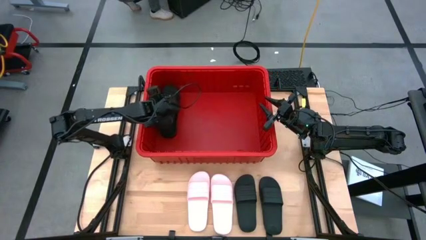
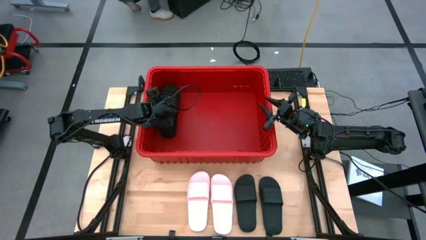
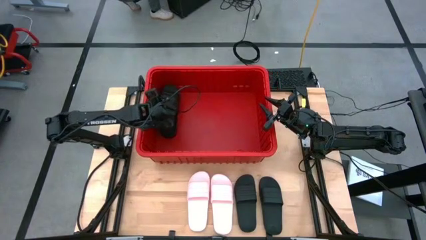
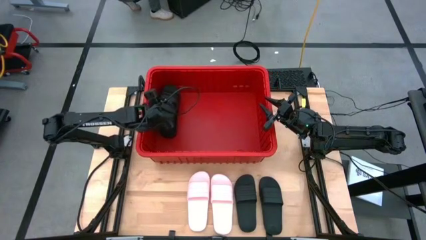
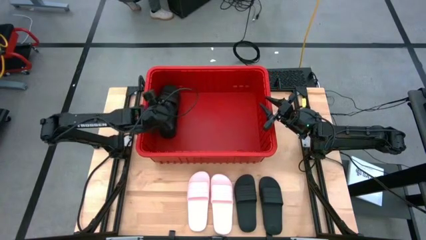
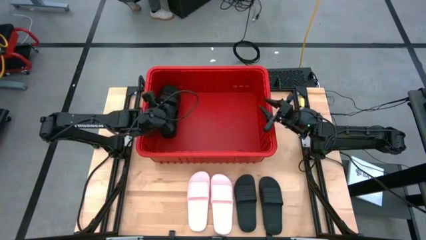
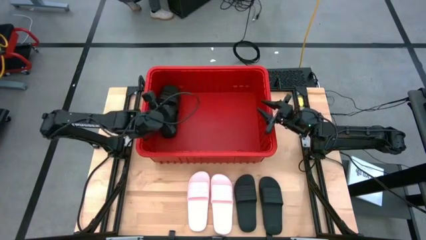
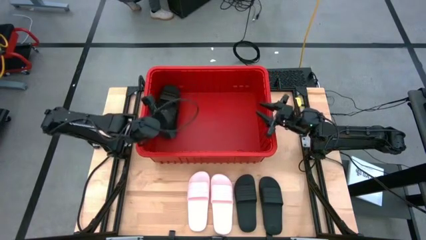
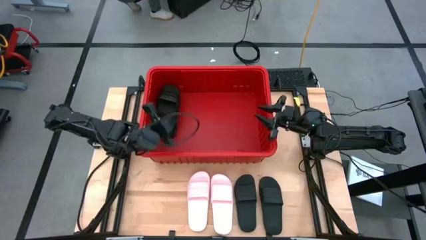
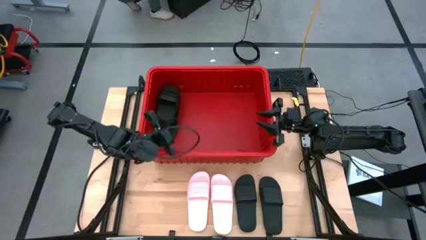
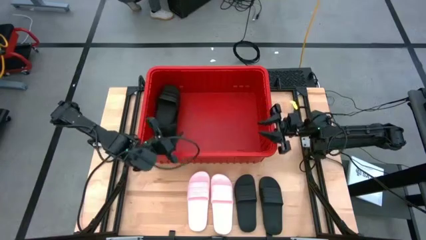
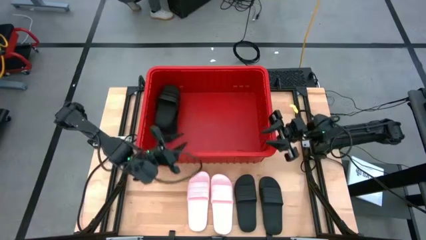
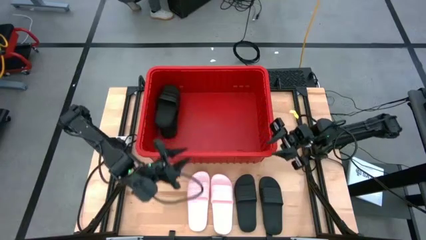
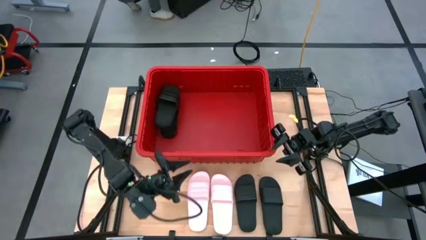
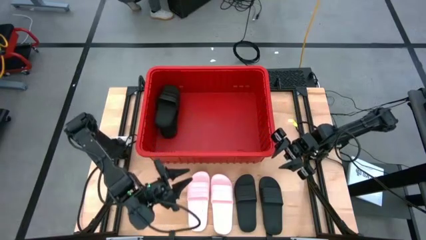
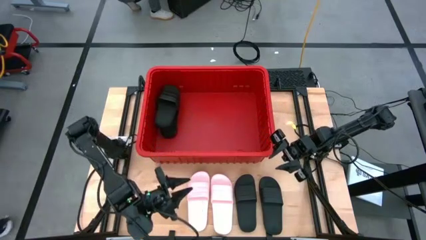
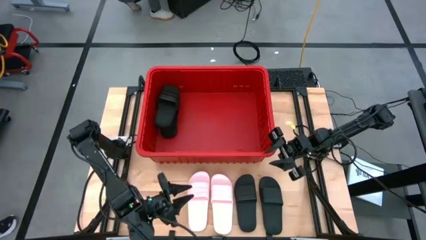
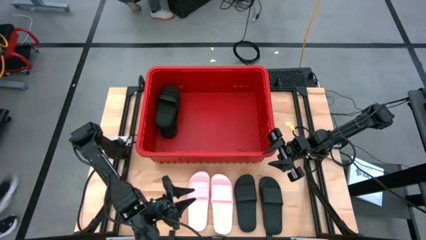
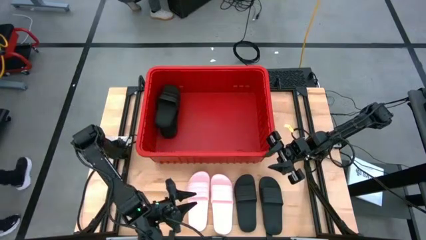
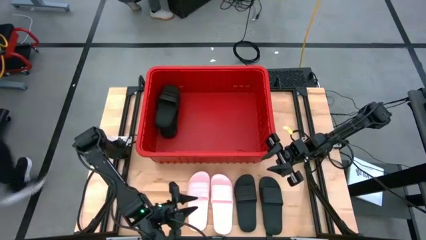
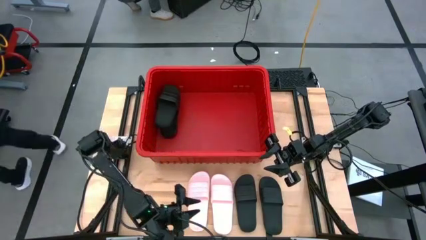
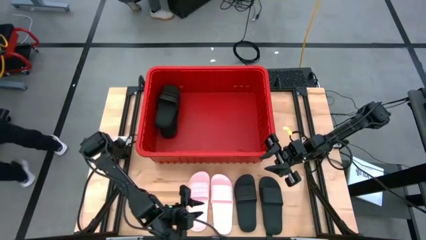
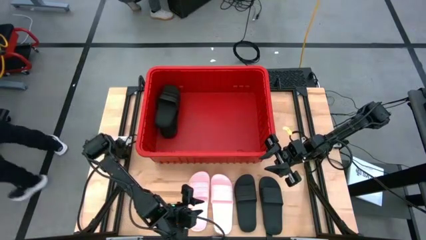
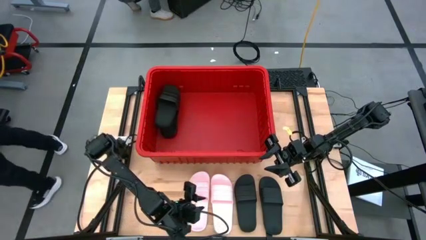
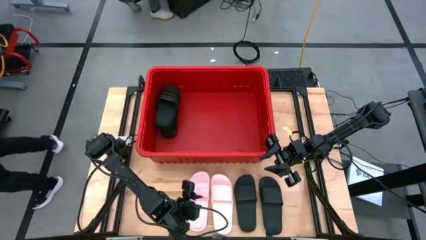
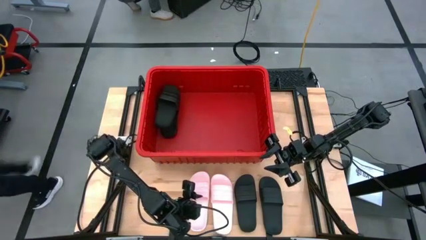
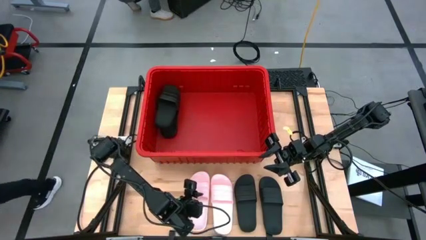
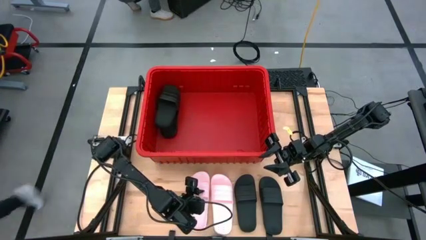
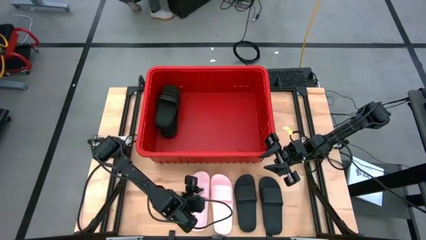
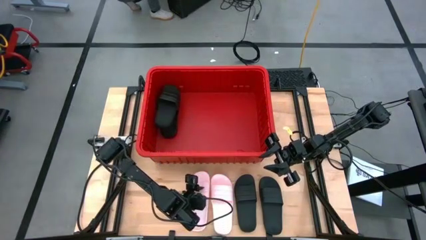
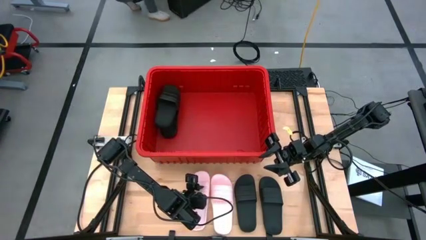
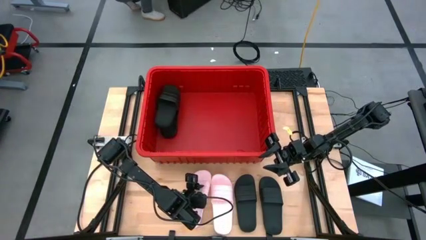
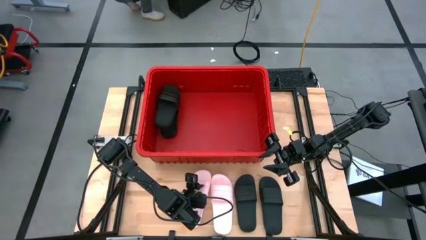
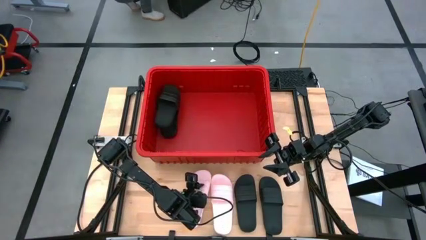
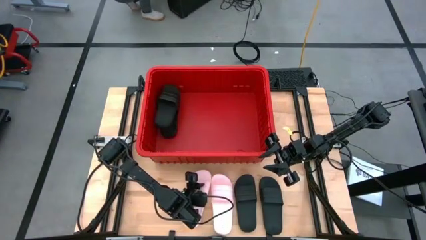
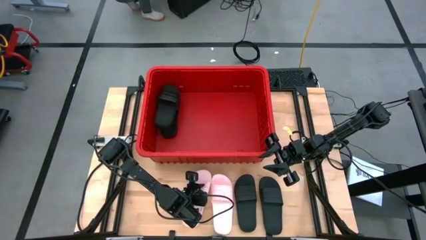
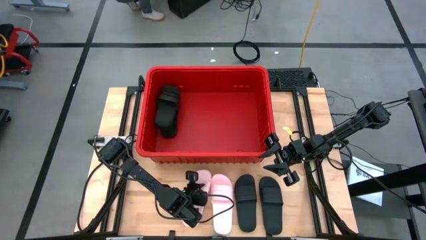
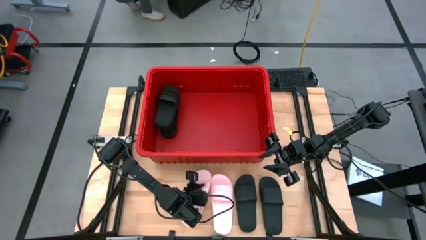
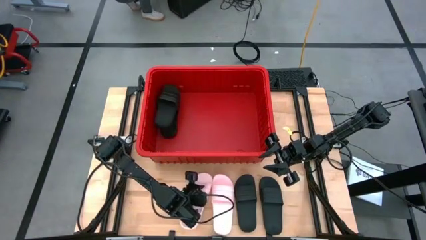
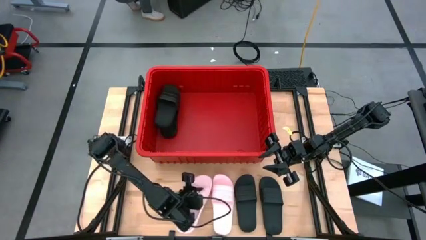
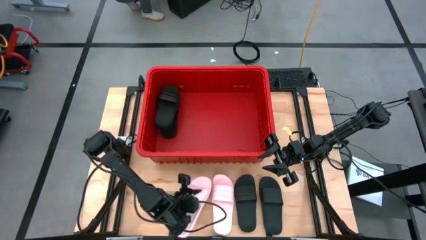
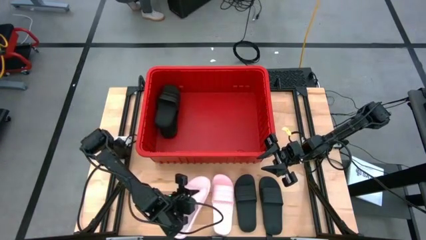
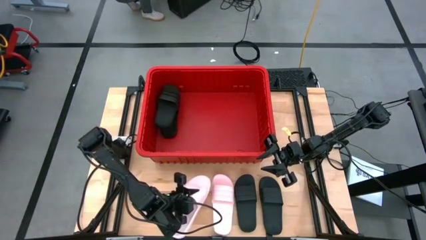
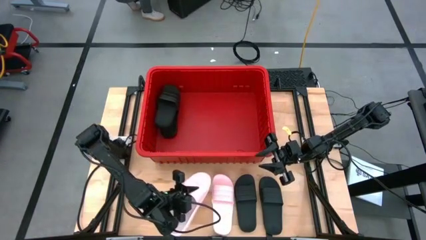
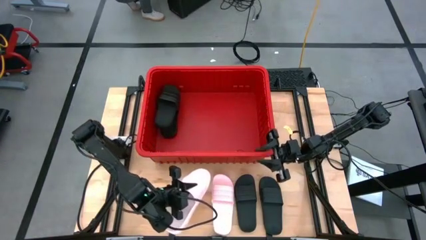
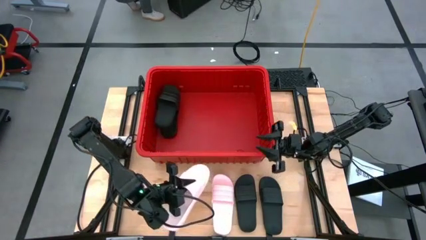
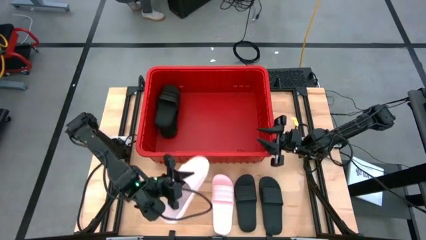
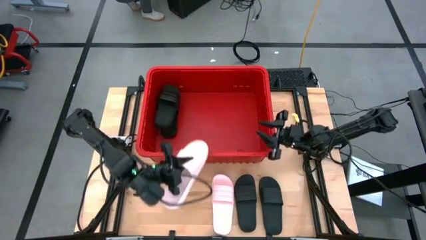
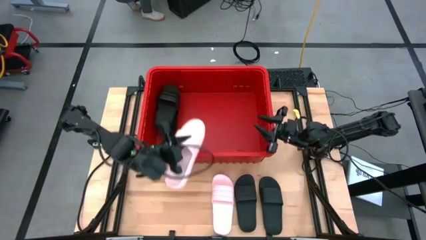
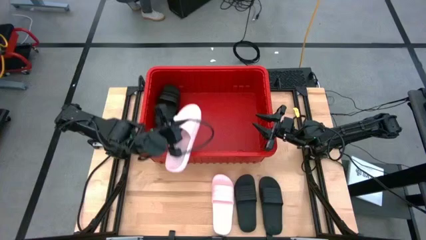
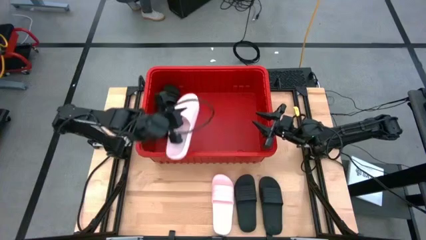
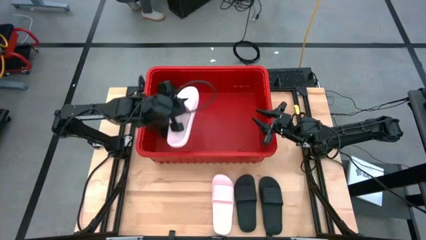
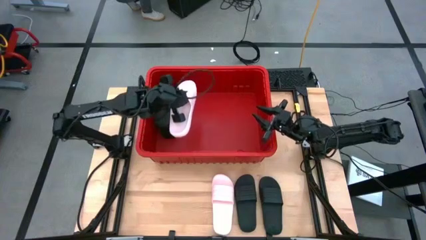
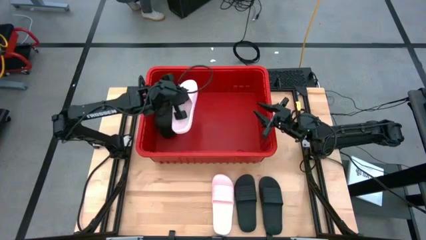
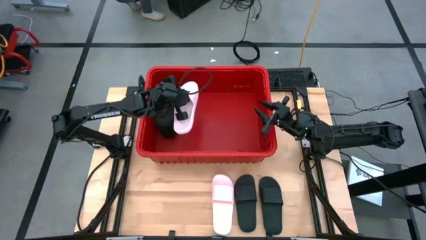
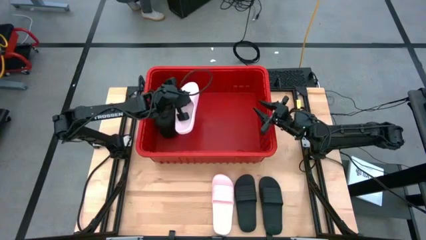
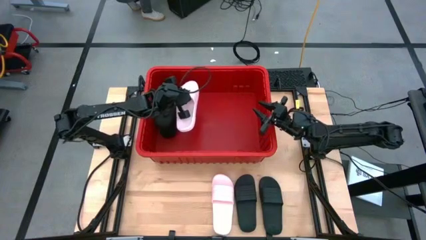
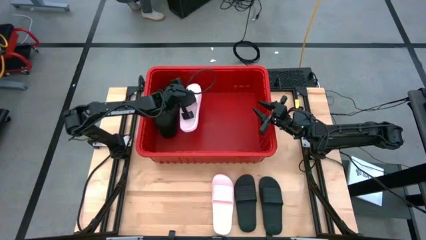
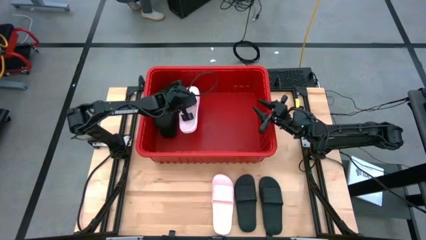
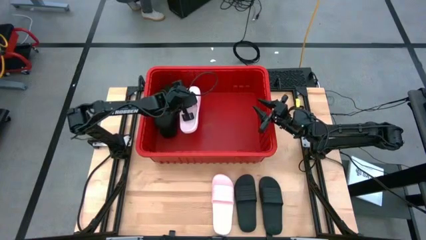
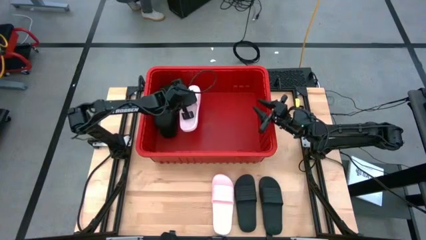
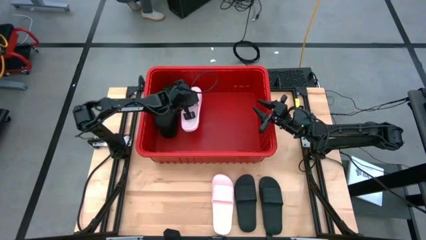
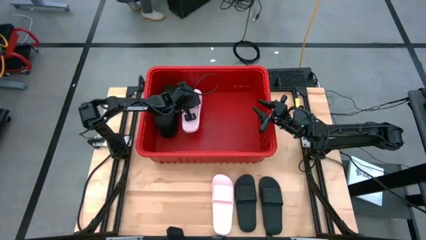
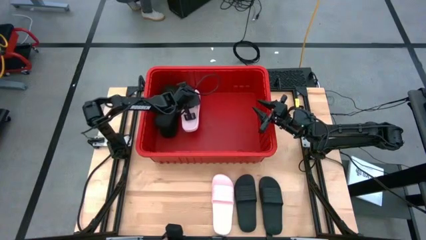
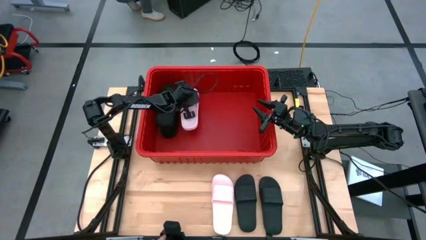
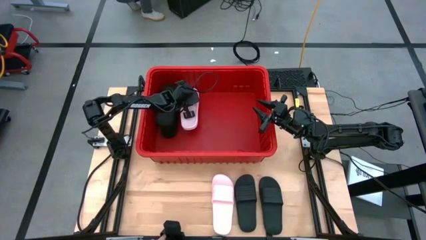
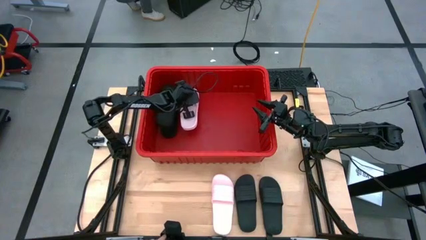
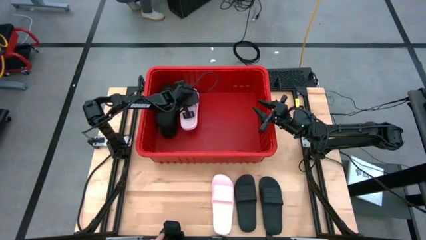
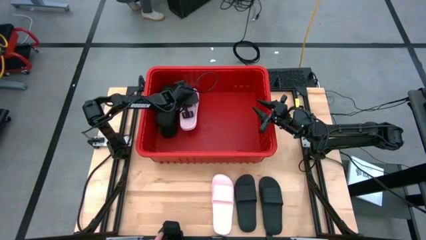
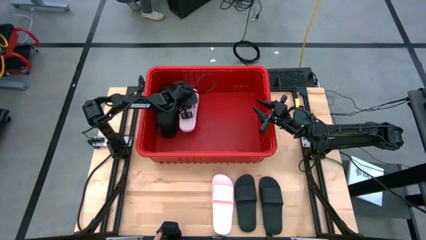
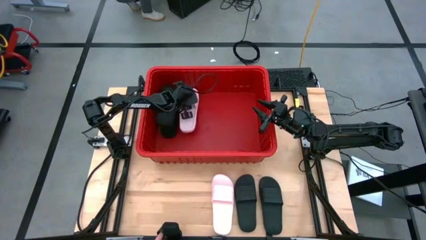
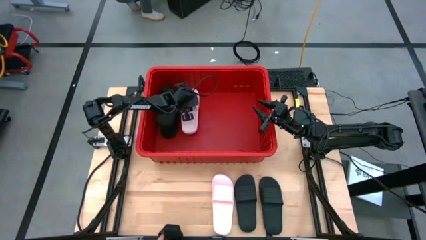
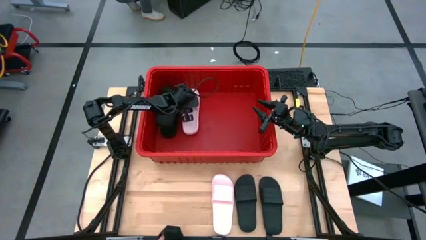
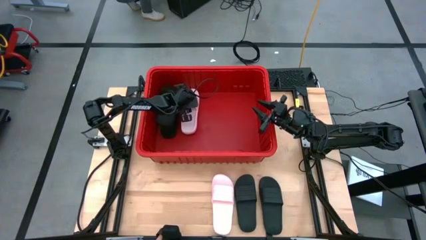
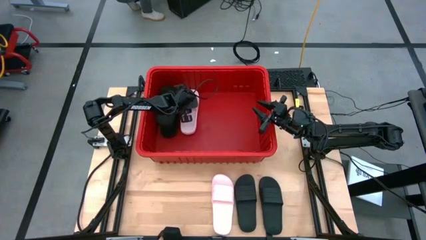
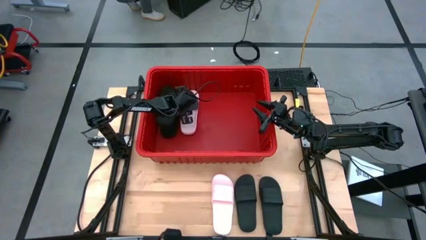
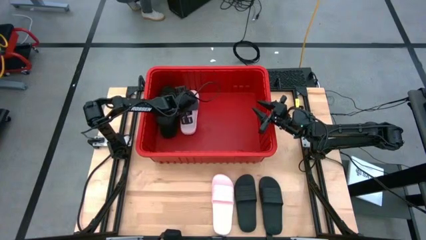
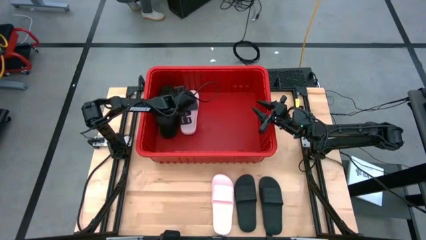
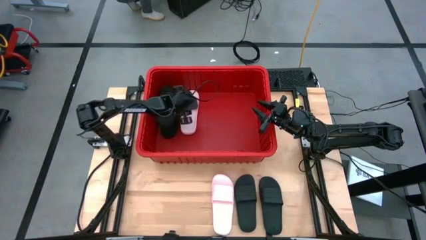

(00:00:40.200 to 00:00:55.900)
Task: Pick and place slides into bin
Put the left pink slipper into the organizer bin
